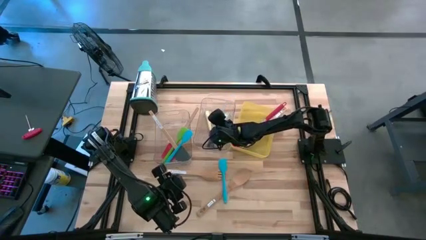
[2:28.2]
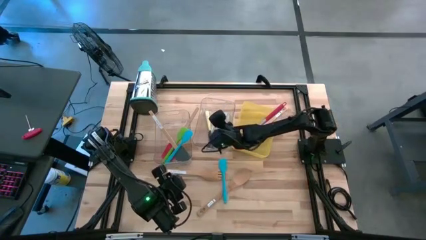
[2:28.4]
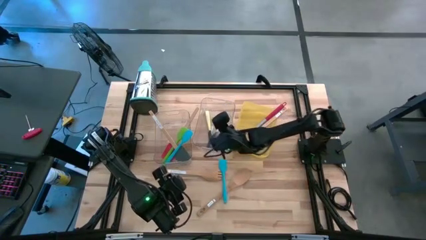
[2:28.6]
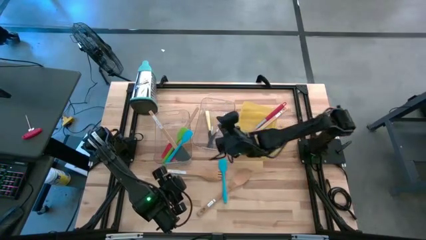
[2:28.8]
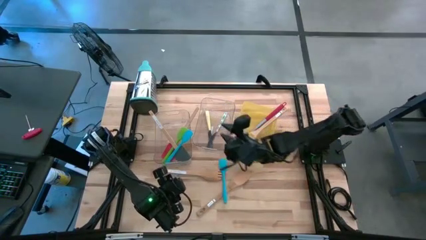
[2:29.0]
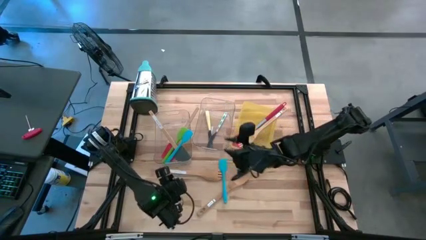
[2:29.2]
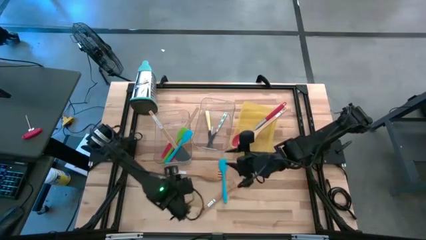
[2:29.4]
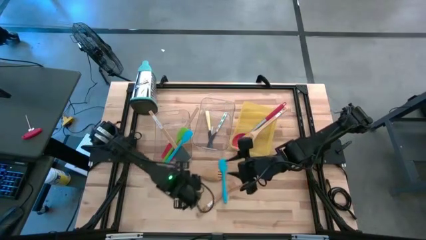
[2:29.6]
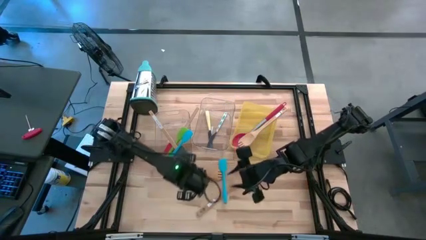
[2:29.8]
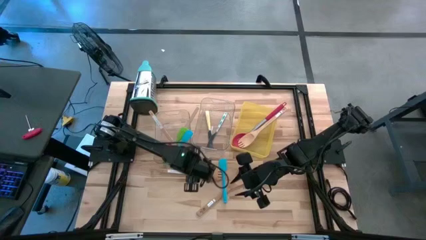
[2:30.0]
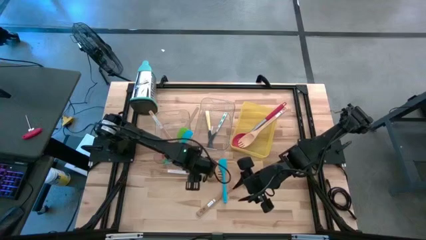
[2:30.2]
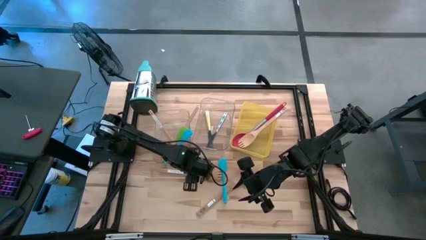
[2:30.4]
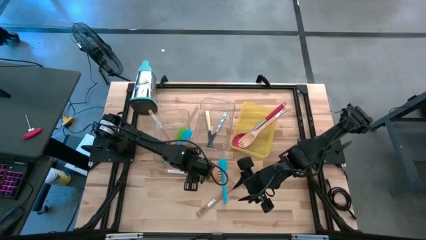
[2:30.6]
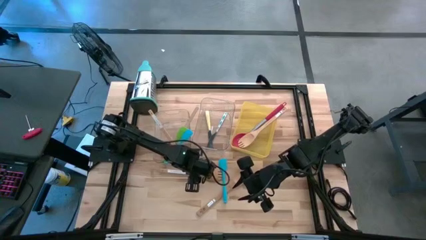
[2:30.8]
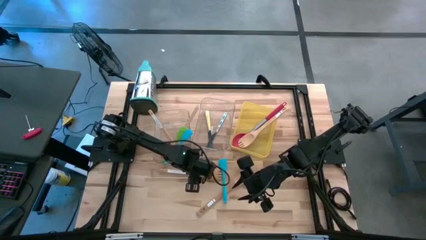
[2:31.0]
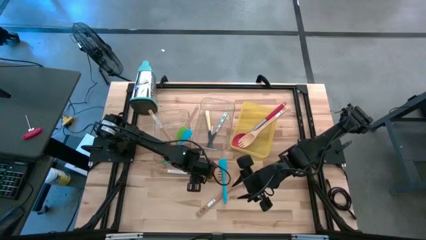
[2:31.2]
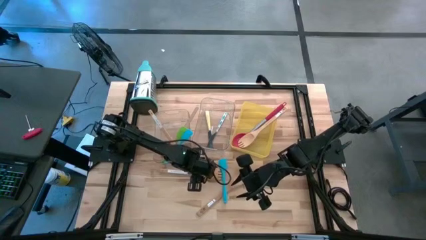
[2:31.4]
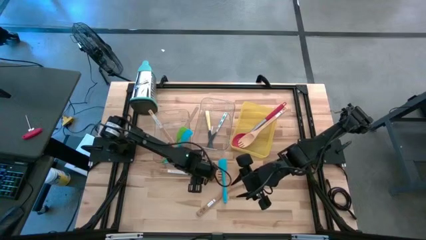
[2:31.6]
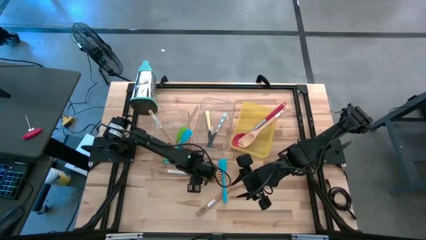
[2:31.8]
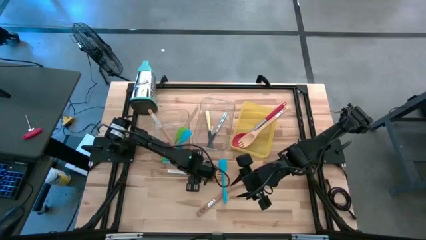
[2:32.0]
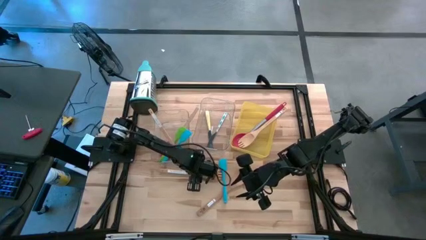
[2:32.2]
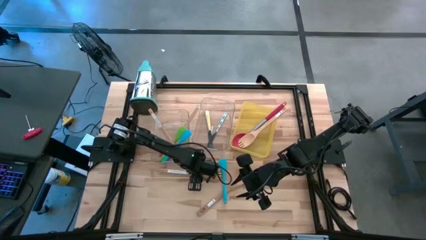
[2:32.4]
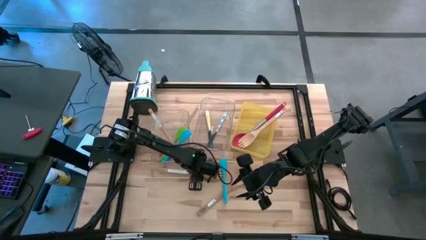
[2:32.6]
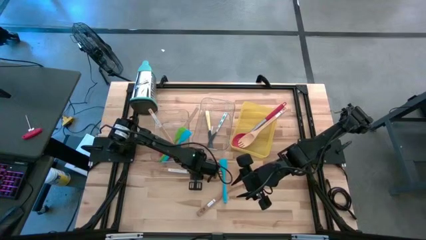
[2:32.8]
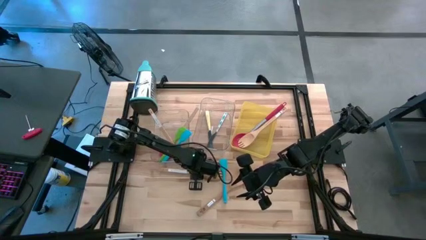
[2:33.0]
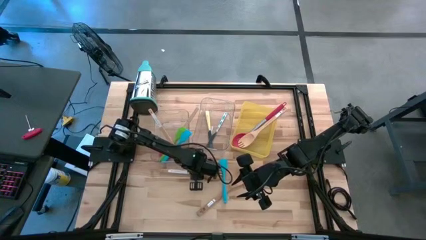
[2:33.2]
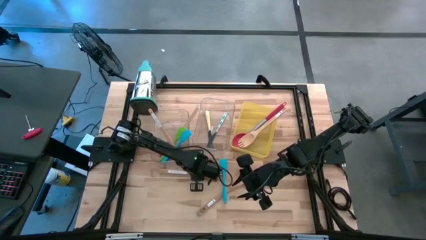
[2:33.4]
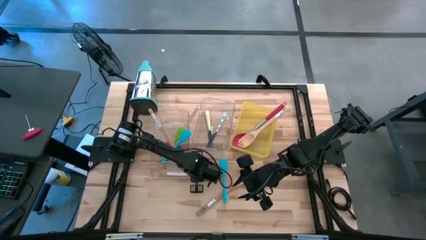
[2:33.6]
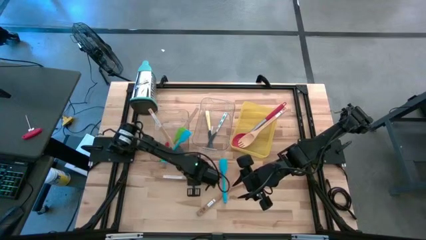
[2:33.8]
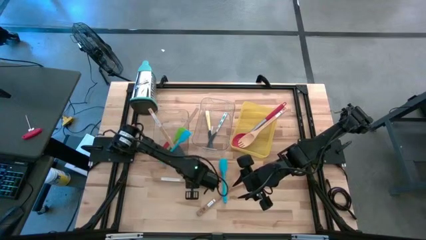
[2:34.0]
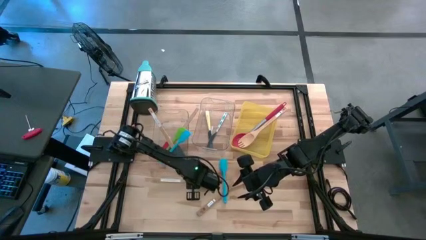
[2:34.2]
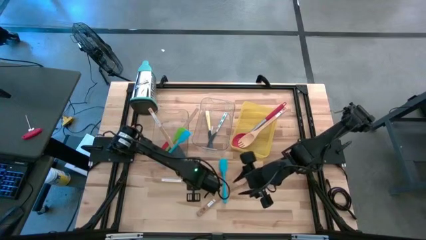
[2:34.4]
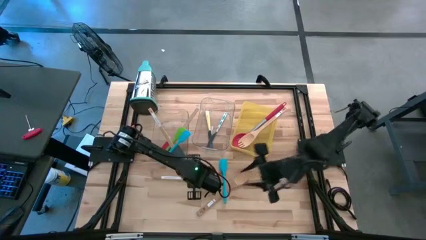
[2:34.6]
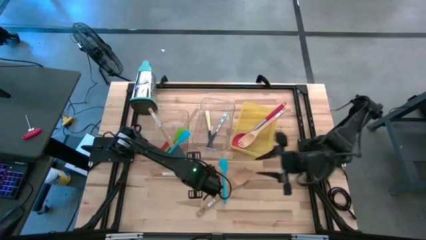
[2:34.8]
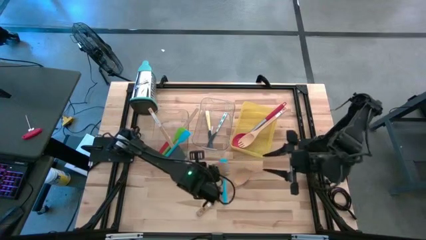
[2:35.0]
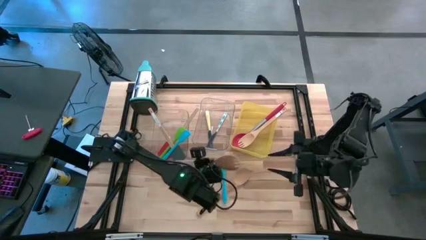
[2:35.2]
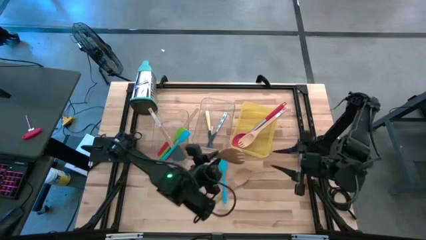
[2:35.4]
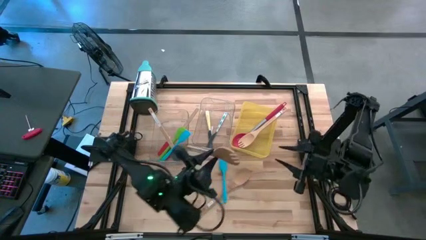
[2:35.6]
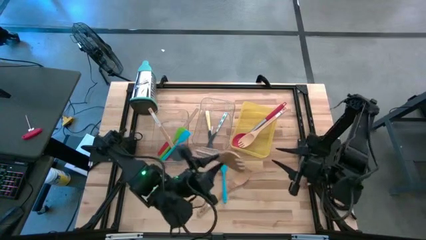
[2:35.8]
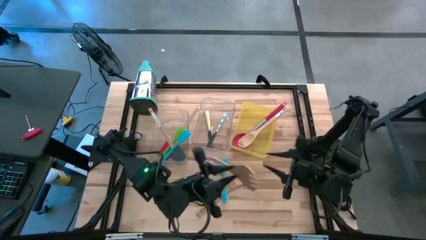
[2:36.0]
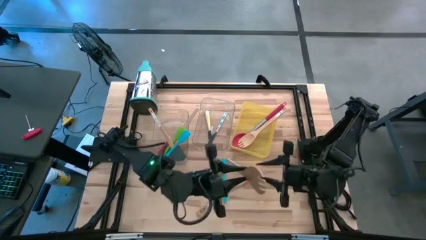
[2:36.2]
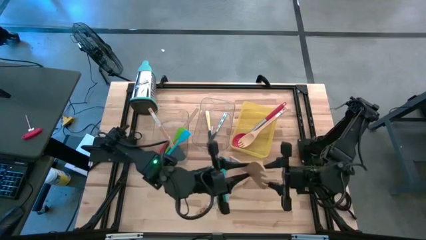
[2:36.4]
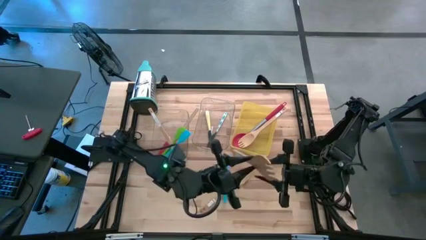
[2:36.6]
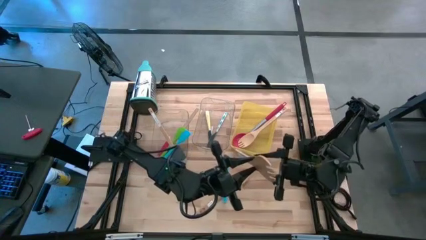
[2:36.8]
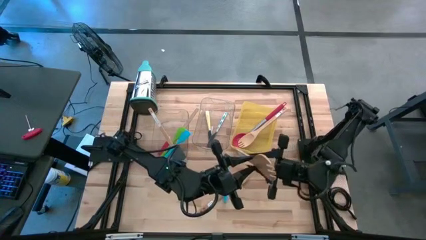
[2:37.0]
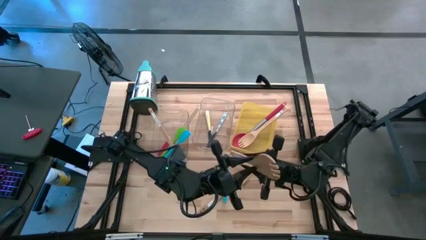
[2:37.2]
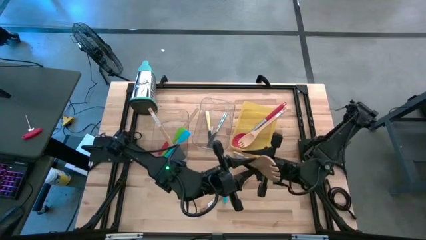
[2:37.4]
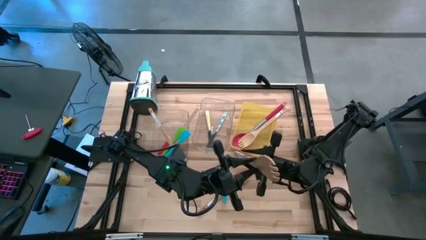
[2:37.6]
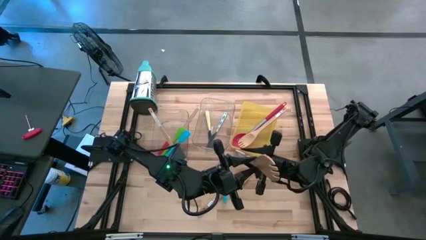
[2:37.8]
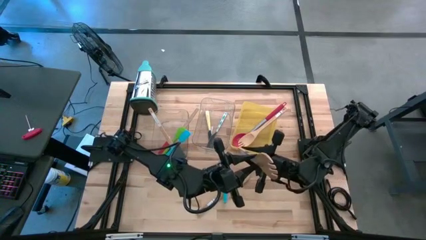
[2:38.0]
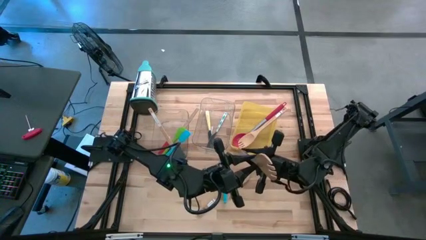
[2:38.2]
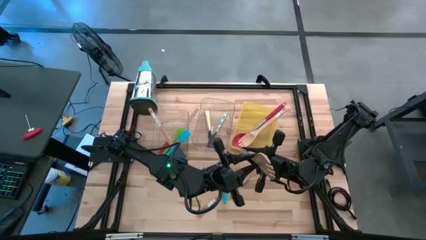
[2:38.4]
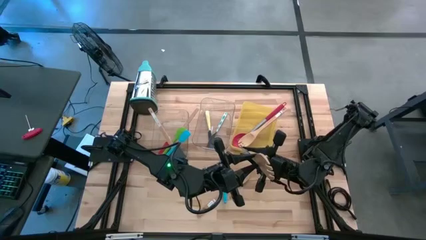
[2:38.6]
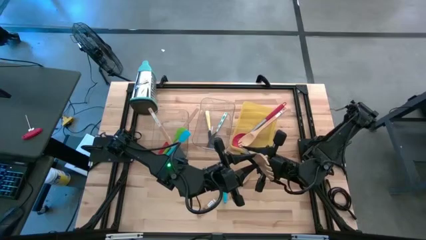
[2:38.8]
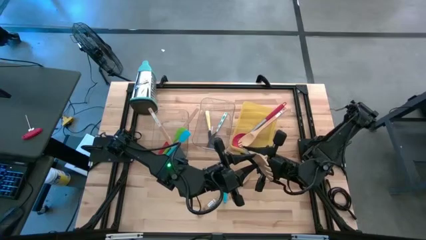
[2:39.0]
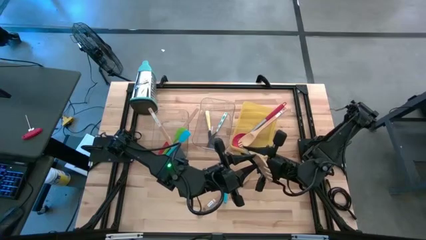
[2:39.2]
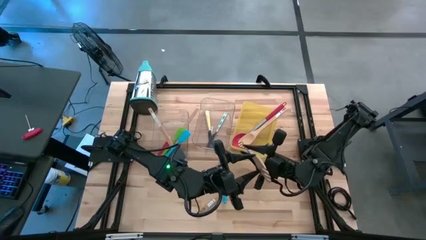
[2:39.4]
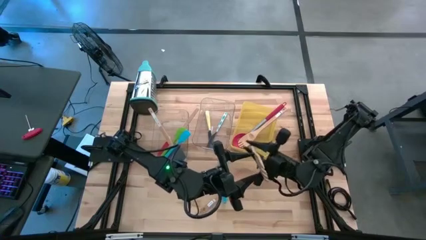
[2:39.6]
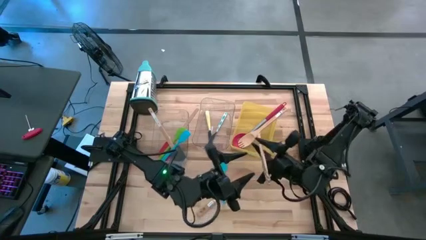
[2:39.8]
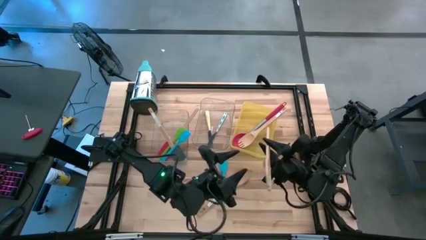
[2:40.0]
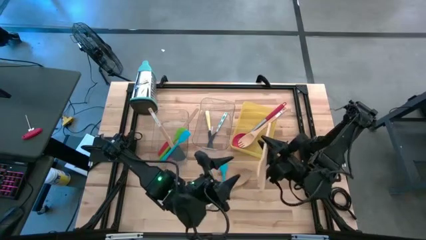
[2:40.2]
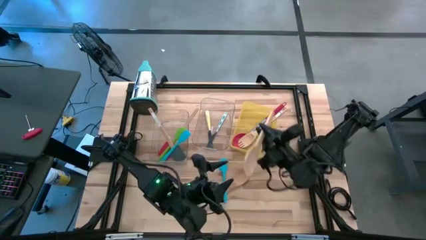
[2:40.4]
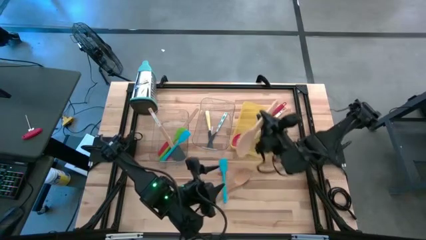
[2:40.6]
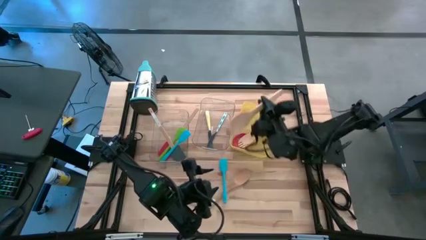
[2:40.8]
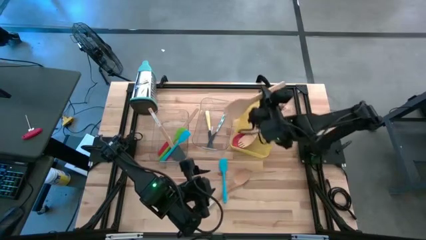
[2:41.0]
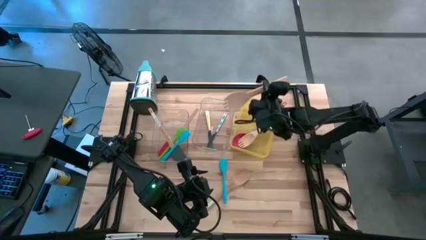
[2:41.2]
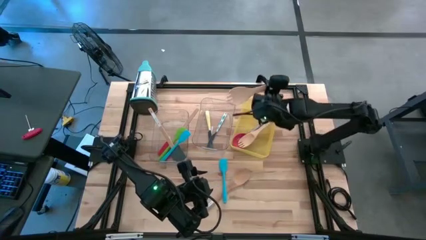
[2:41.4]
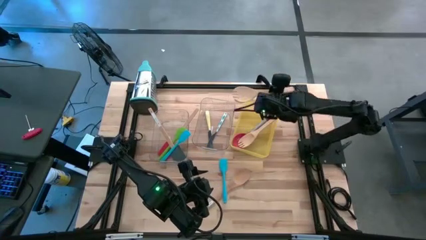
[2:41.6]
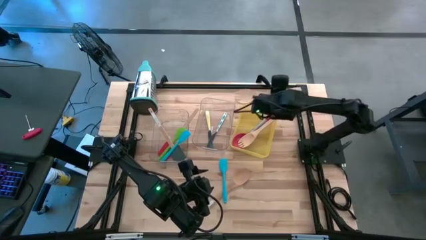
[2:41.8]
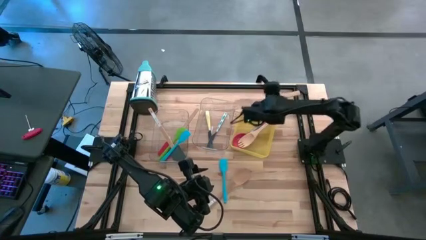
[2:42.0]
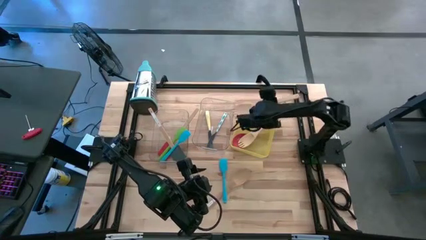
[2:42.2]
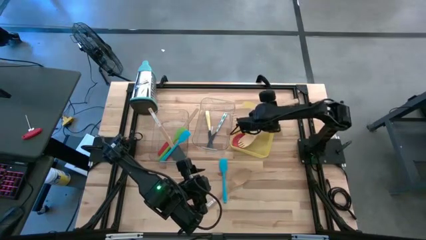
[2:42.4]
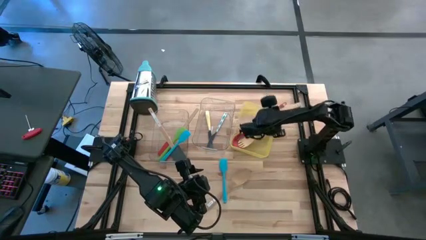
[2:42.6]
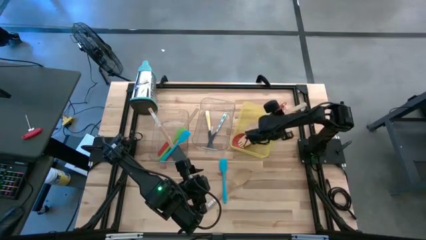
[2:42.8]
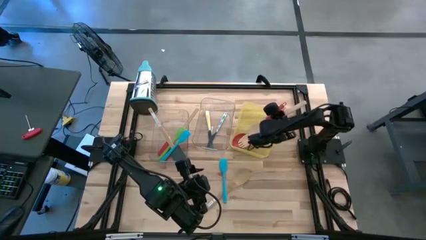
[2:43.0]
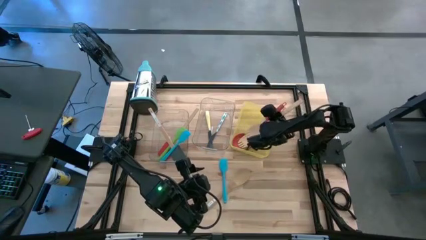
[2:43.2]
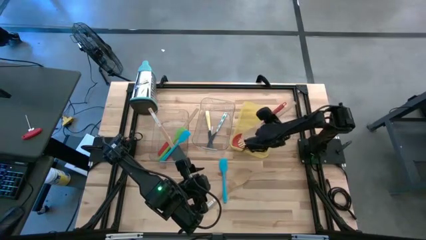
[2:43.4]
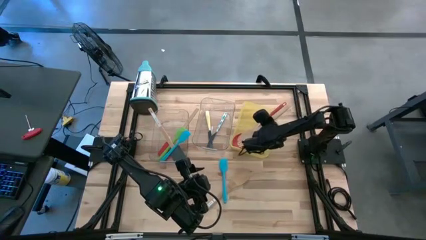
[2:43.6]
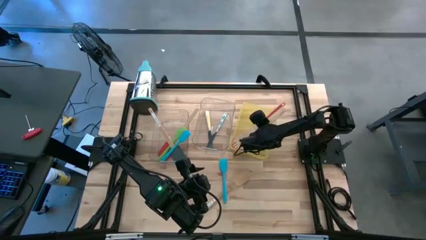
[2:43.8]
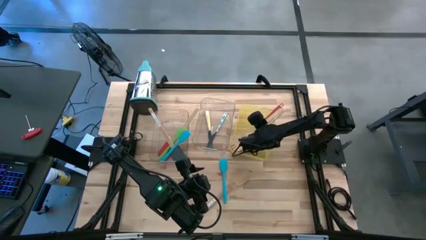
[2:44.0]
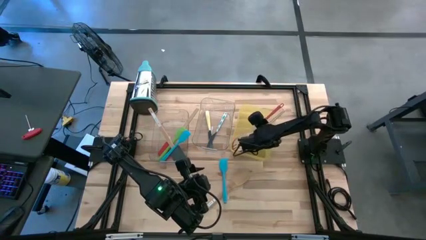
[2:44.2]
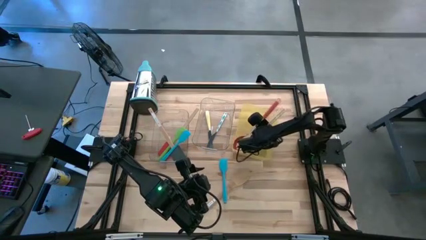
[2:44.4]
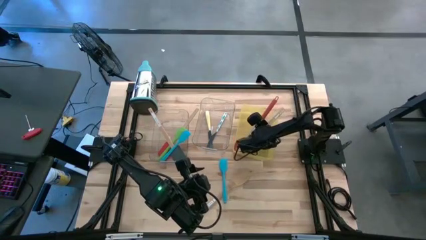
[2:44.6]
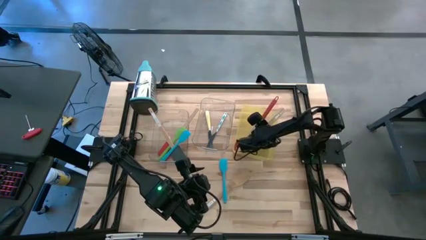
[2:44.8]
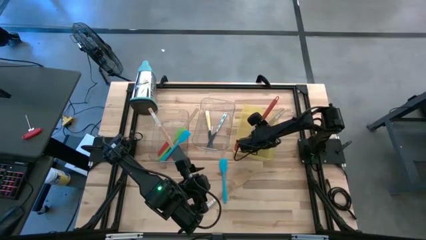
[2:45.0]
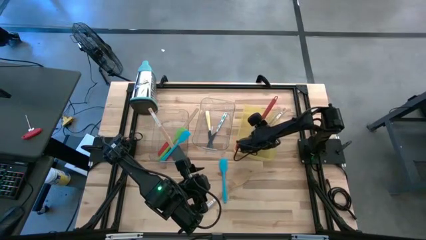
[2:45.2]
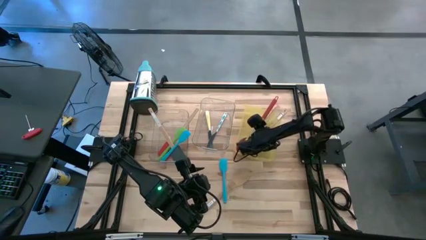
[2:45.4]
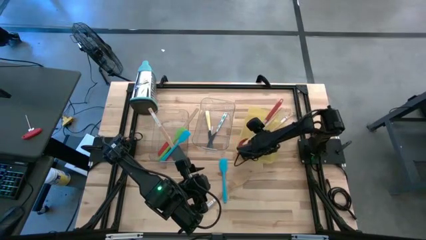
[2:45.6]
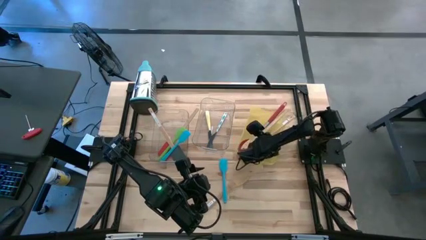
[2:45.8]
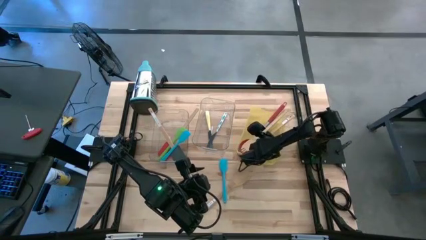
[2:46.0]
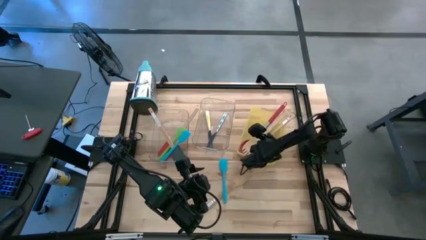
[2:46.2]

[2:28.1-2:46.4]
Task: Pick & Place Kitchen Items
Put the brown serving spork into the yellow bin
